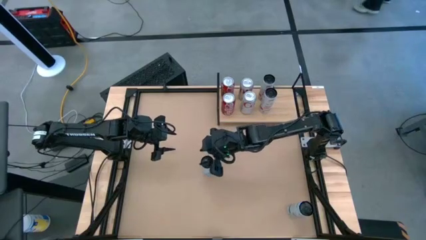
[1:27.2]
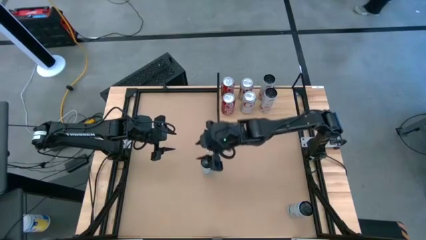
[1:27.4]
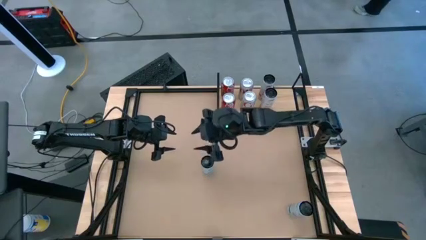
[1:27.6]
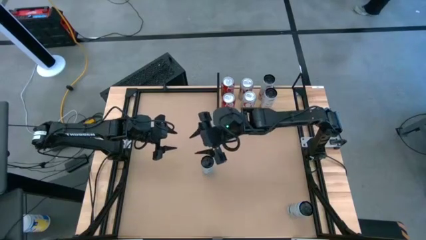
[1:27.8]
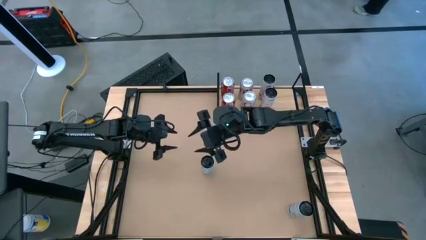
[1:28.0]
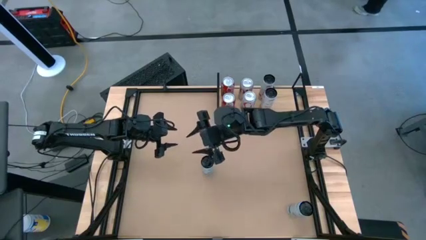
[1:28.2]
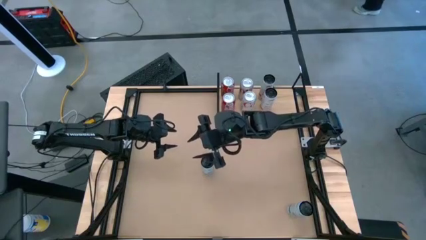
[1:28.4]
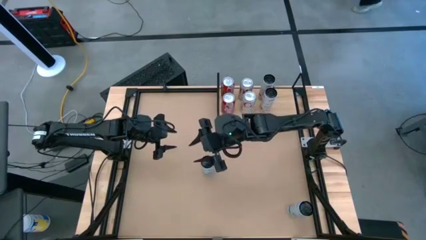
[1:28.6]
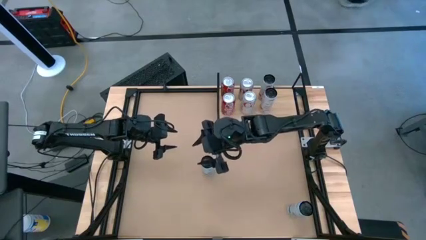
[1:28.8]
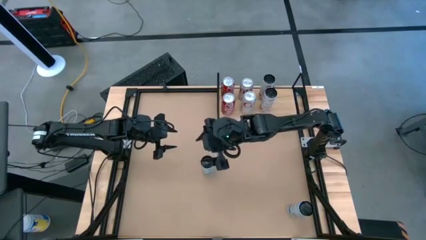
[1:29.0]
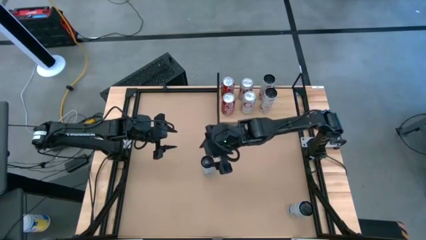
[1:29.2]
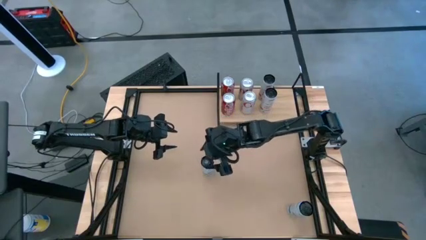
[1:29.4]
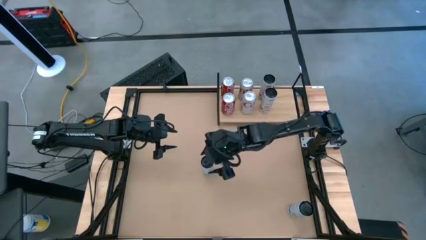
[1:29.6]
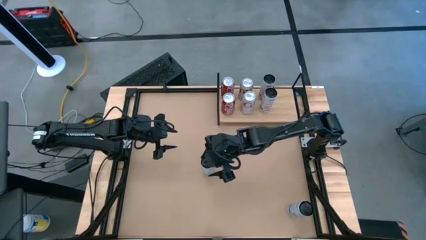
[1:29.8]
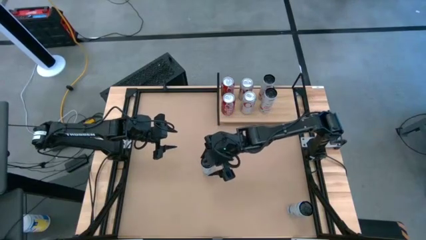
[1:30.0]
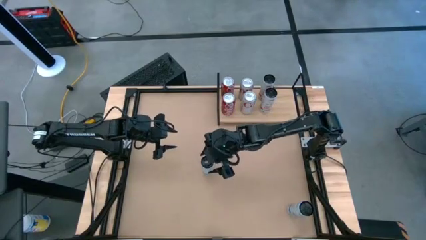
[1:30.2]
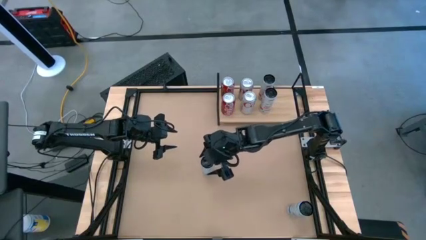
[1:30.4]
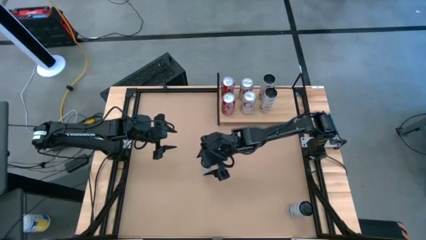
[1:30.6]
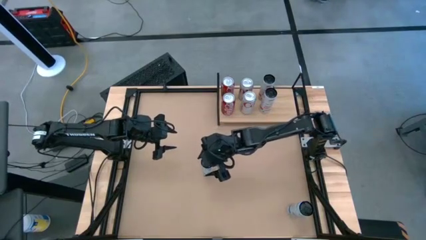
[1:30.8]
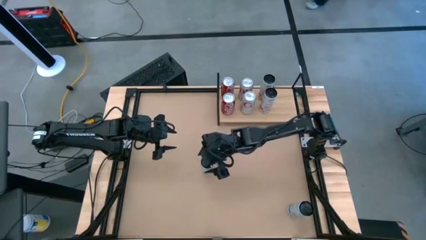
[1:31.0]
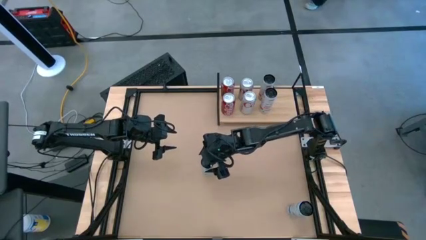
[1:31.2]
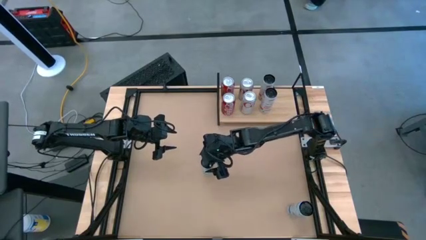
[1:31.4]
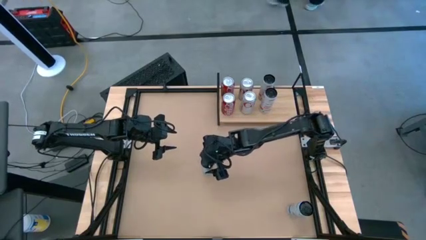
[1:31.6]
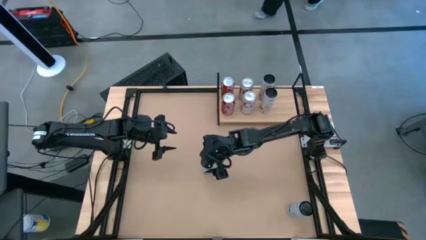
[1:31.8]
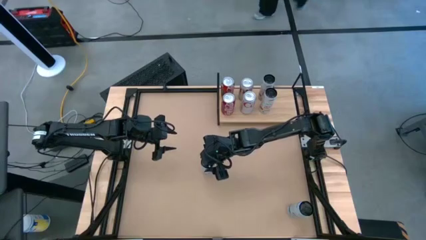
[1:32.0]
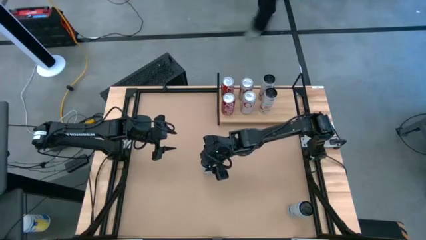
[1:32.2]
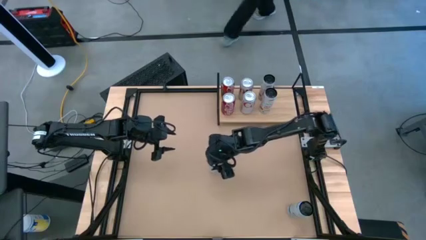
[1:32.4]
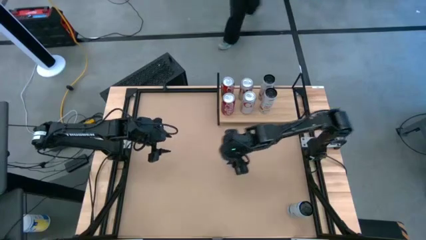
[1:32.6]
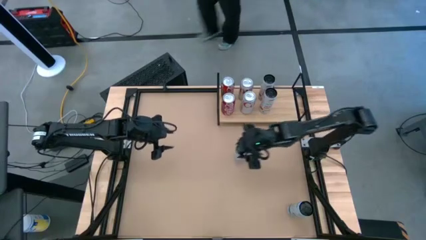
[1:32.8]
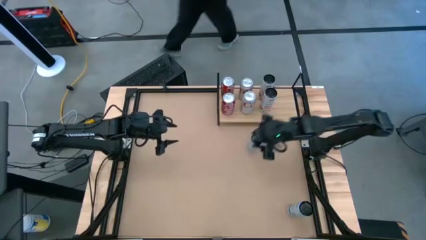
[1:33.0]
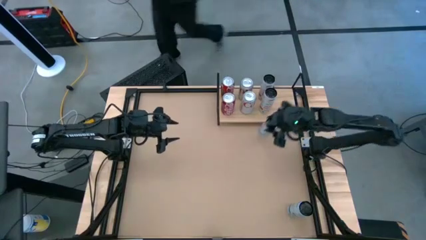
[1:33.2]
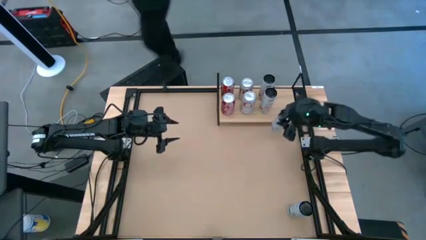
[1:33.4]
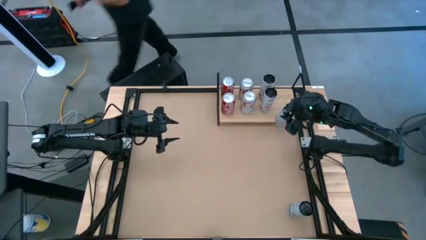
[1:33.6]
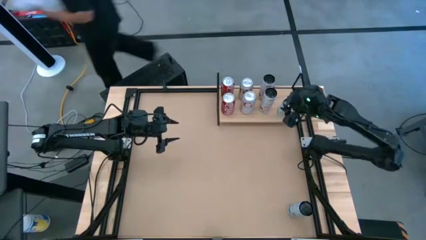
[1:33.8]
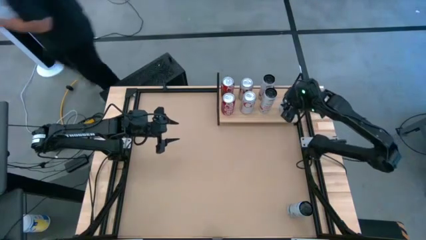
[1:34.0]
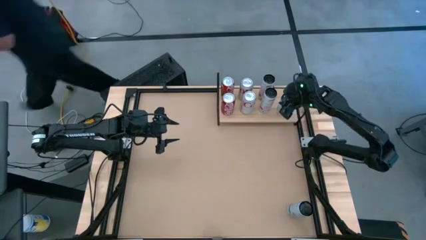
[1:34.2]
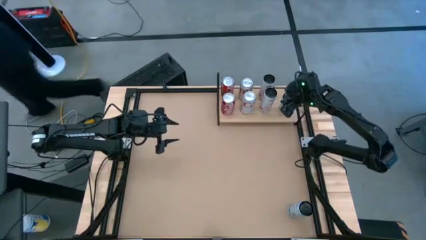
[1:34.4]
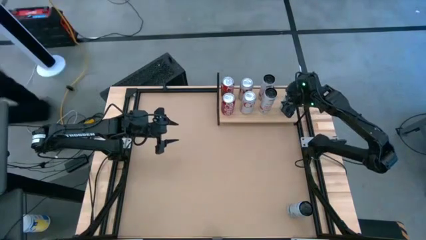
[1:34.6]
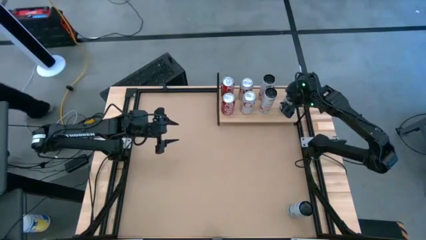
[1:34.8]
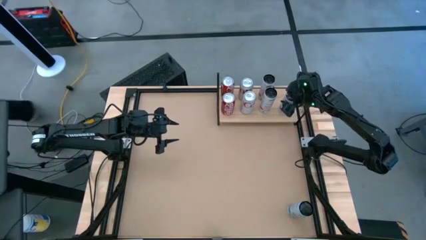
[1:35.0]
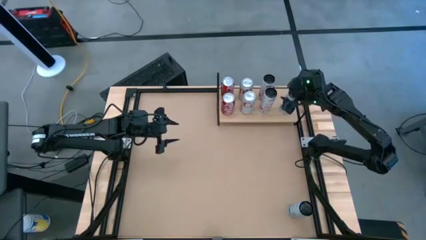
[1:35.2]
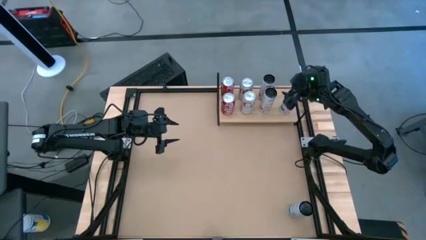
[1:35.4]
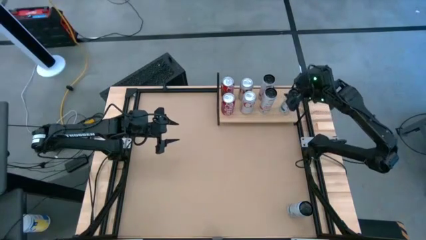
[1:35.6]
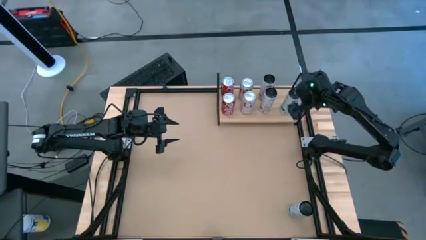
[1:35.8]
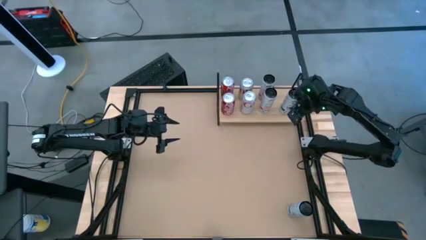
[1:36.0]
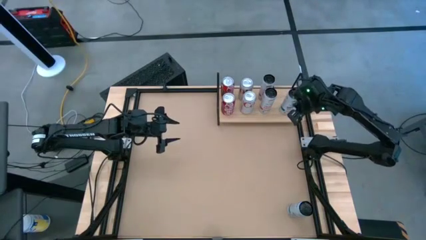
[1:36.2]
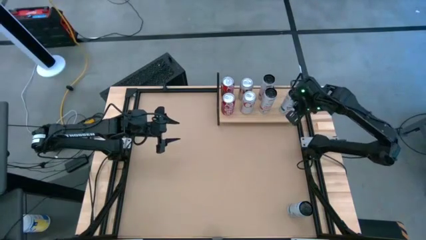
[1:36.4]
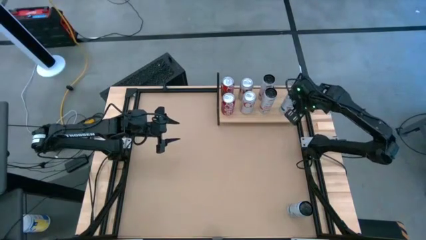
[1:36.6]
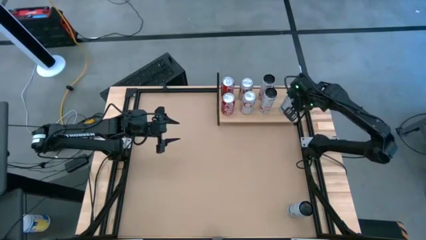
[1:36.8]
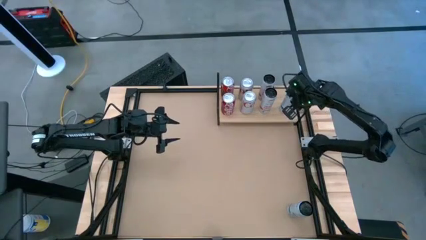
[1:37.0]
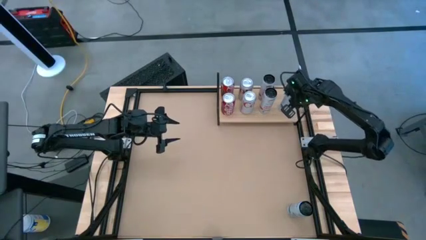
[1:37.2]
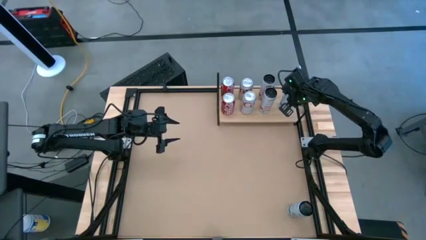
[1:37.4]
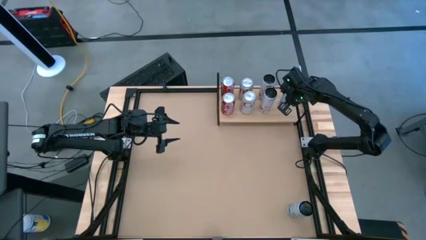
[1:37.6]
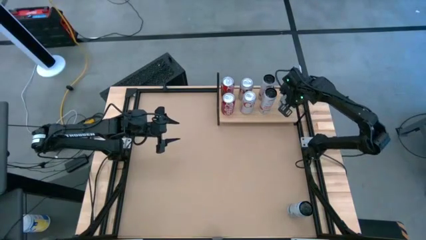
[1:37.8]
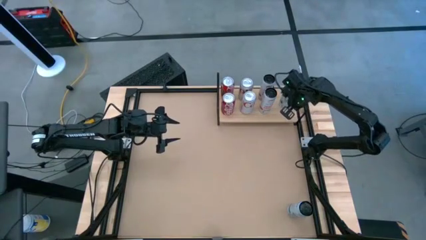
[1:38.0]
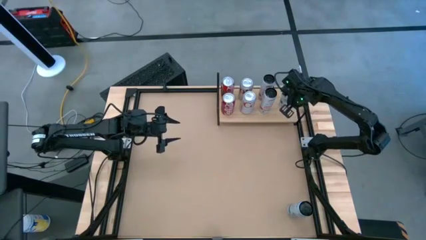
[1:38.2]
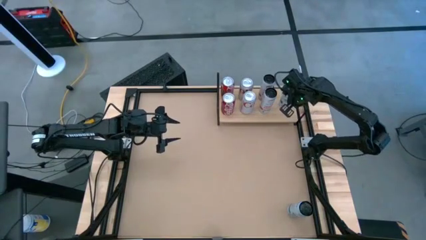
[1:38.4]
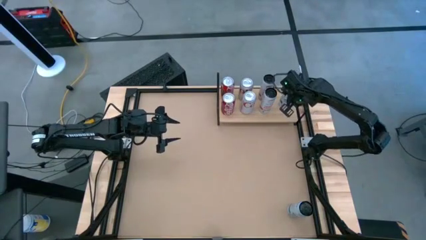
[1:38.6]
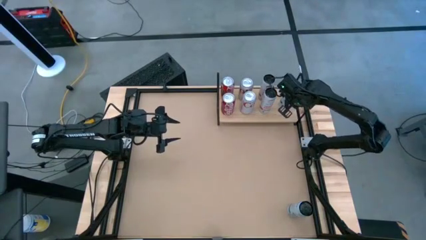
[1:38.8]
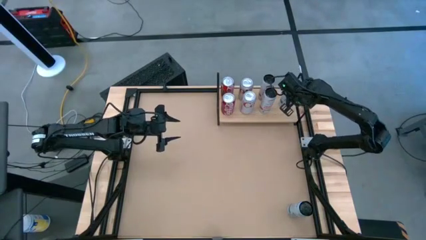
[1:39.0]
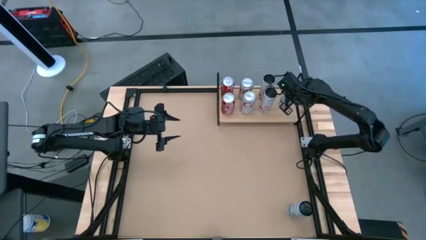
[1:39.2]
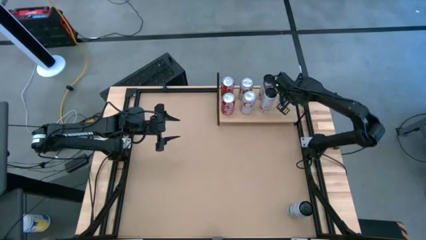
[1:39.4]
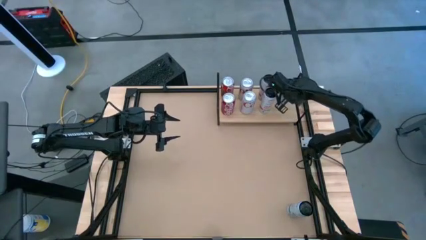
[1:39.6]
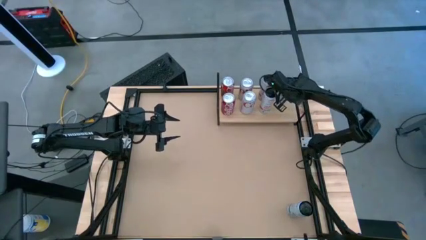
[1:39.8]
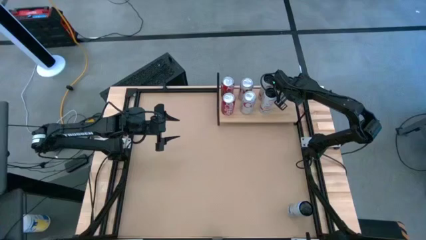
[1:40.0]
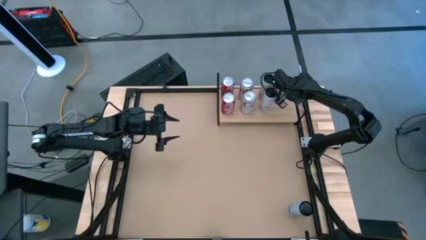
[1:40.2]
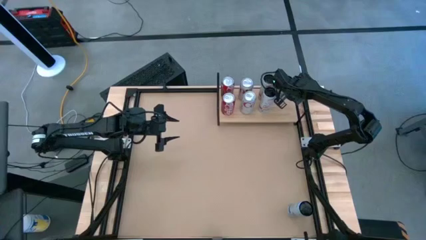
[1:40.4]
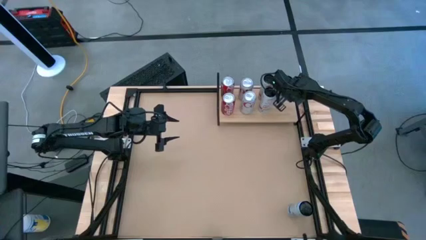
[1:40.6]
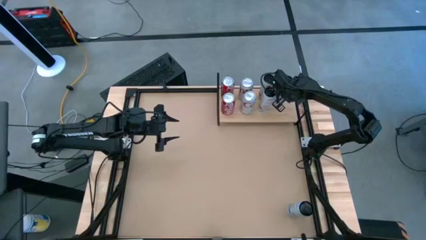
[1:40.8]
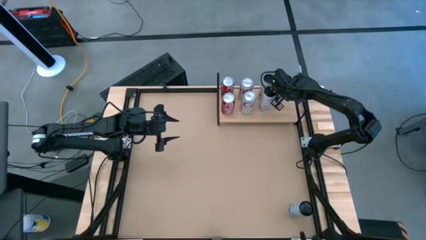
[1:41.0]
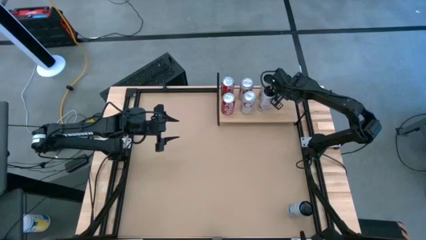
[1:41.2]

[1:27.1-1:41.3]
Task: Place canned beverage on shelf
Put the left blue white soda can on the shelf
